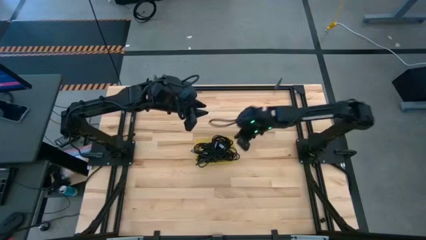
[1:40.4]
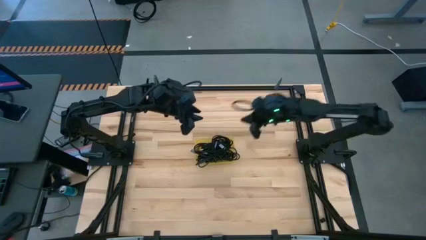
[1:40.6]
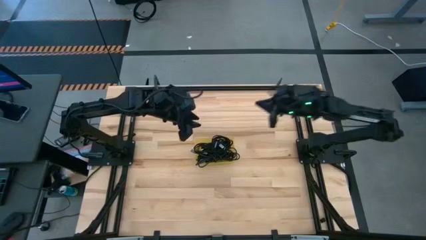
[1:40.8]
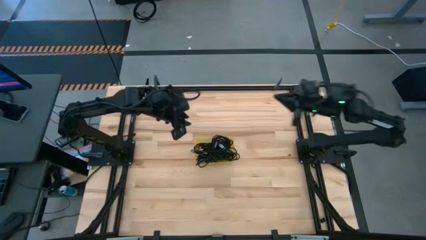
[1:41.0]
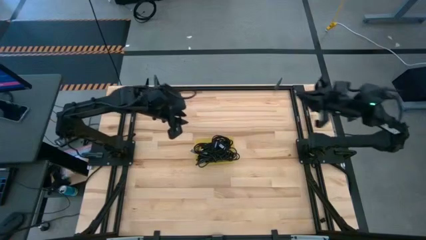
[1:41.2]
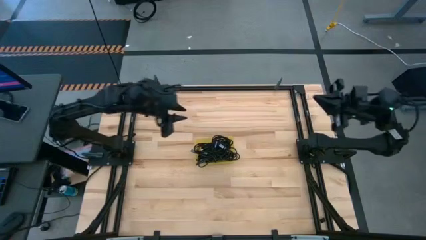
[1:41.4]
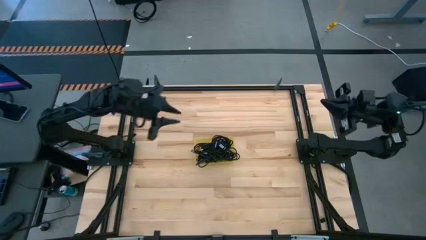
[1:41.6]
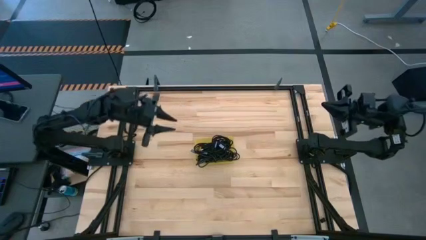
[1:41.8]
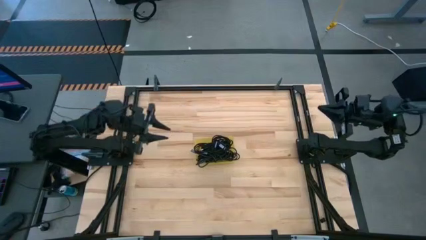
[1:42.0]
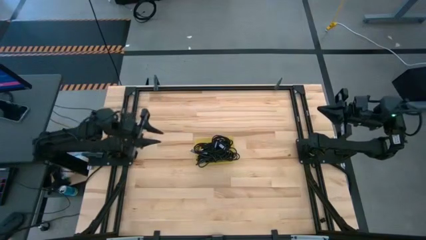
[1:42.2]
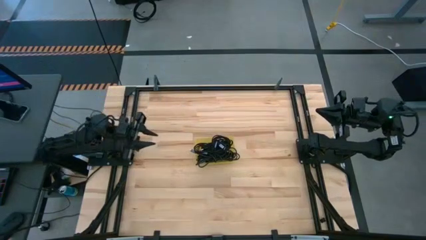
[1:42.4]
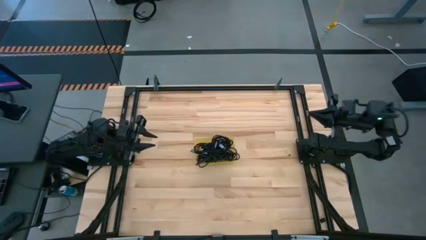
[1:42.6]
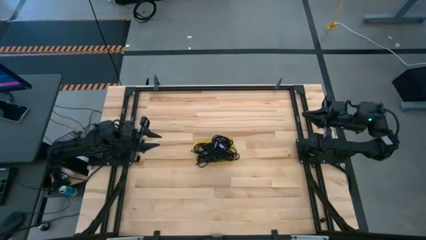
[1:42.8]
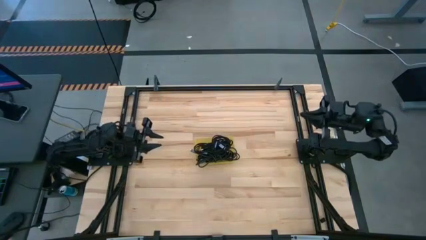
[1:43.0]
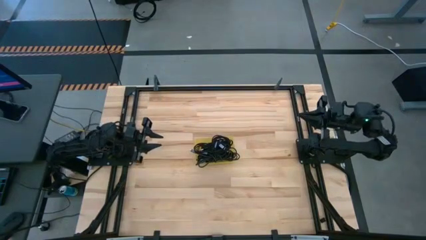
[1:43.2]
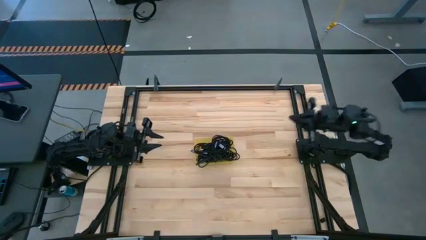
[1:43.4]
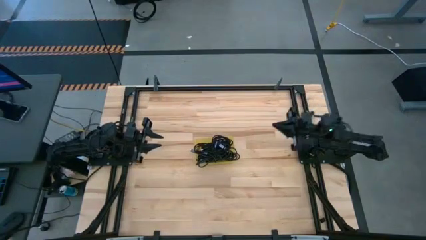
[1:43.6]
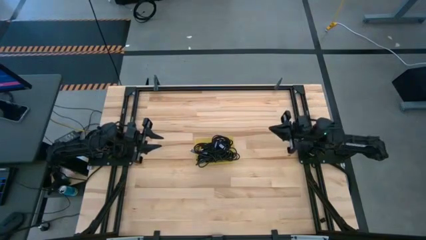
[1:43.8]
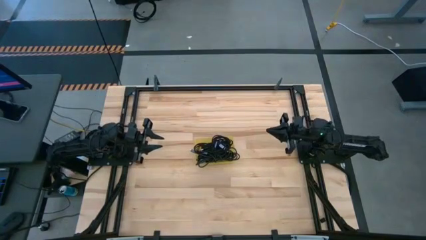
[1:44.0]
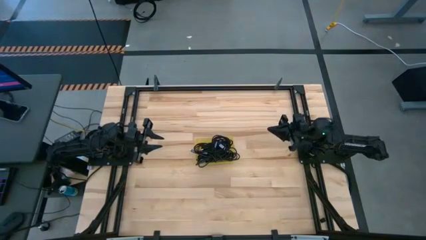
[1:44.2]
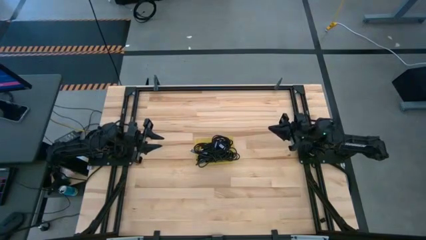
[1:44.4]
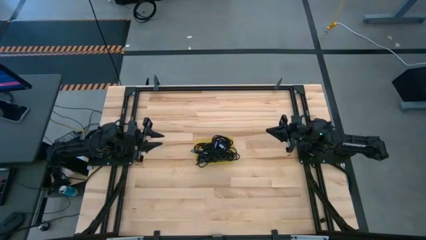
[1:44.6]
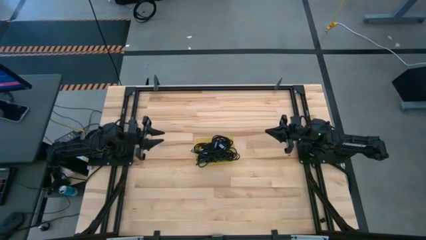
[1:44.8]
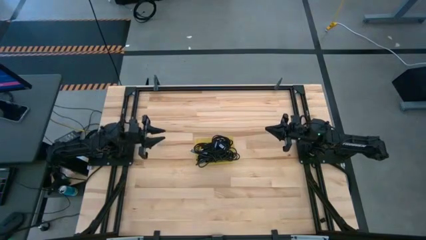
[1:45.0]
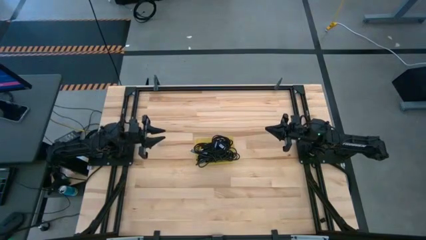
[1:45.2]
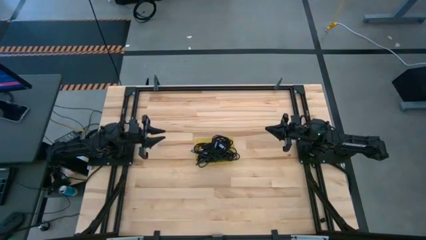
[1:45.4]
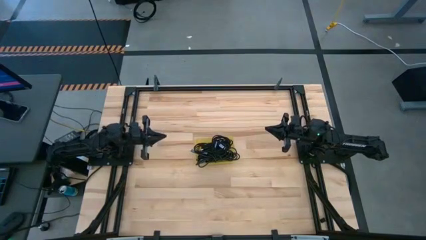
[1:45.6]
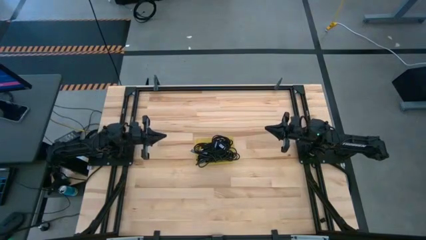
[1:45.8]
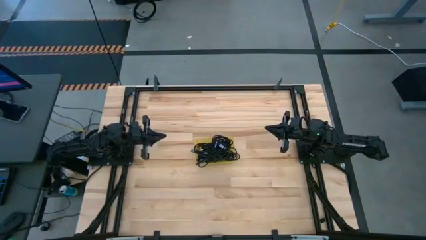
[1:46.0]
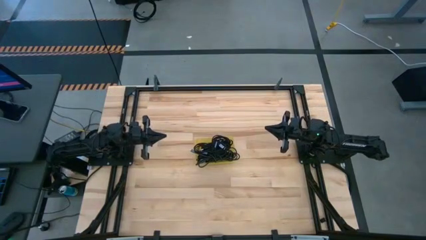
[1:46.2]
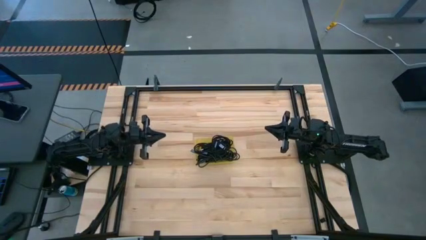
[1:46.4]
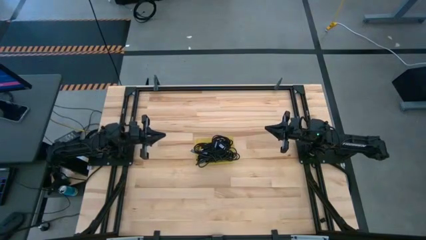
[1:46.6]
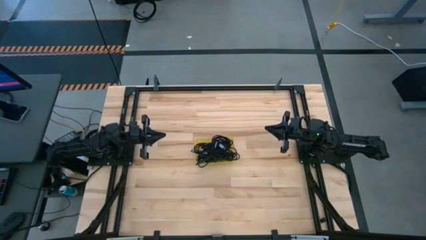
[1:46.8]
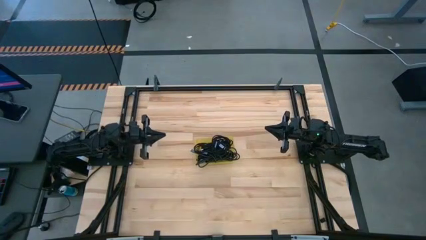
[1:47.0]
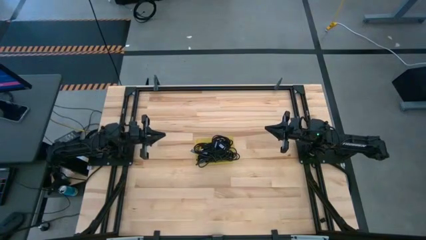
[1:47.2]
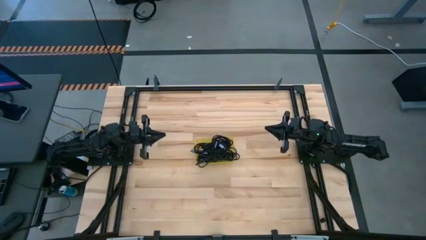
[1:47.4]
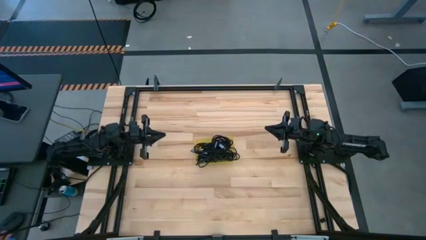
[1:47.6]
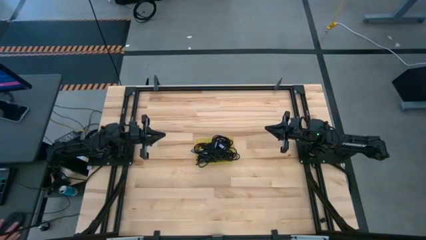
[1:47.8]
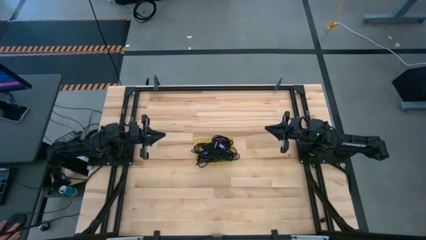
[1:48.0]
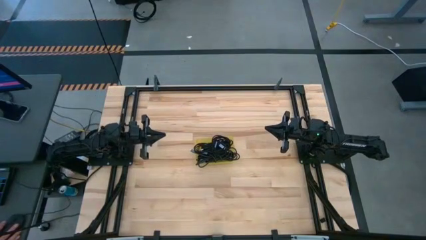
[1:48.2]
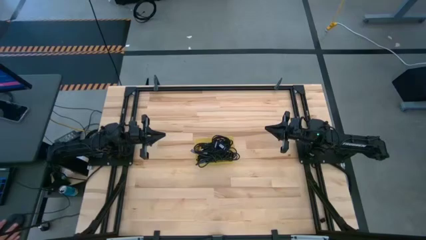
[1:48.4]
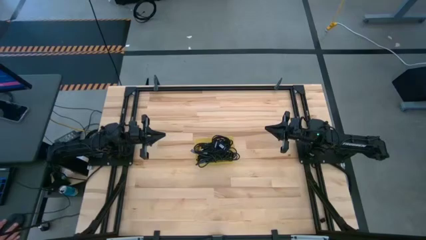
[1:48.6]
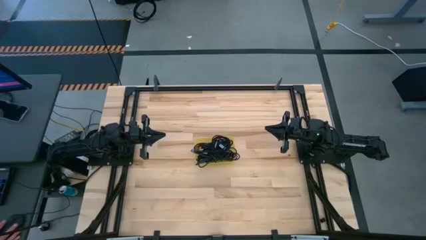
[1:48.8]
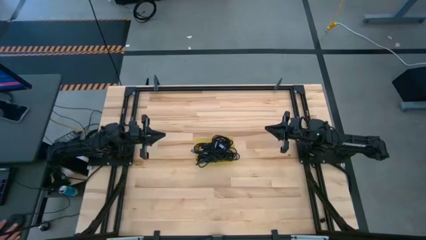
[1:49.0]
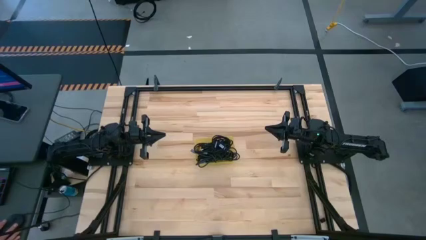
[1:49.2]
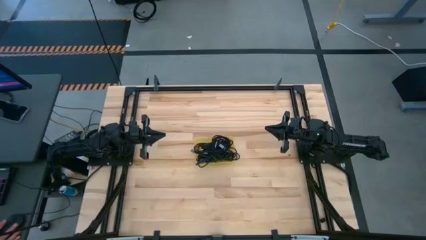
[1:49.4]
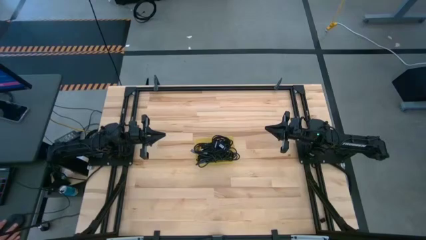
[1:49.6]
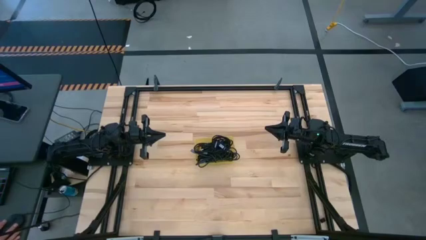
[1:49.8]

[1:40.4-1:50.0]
Task: Pick and place USB-C Cables
Return to Home Position

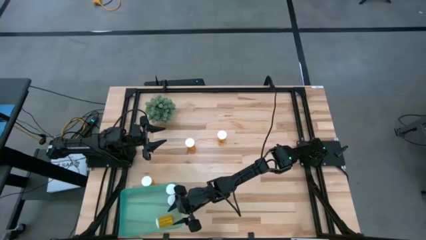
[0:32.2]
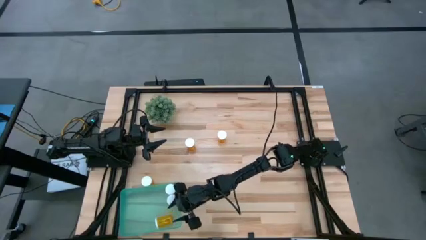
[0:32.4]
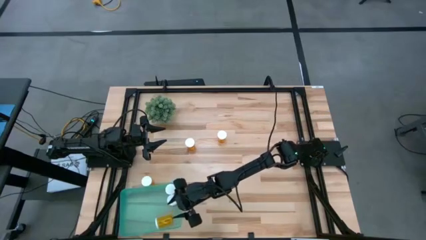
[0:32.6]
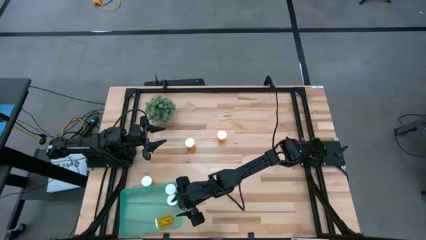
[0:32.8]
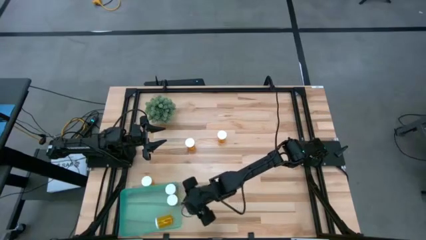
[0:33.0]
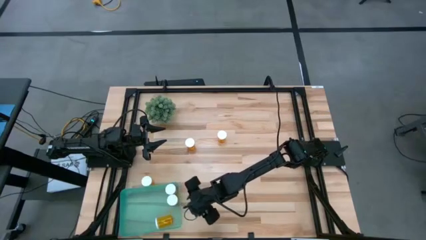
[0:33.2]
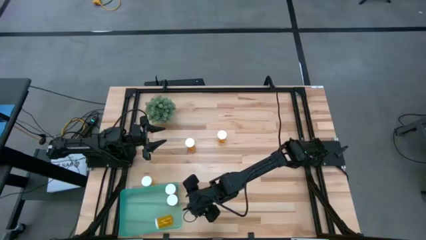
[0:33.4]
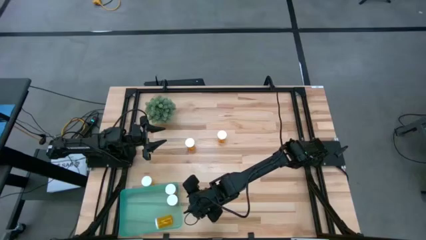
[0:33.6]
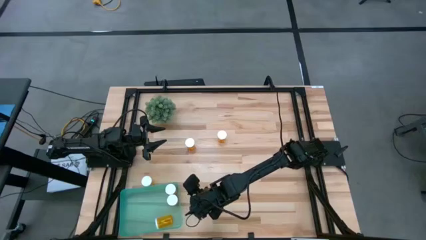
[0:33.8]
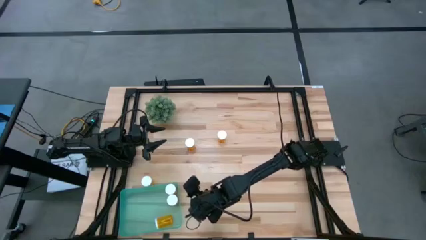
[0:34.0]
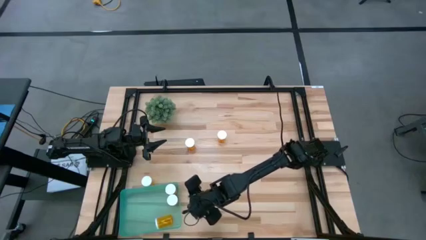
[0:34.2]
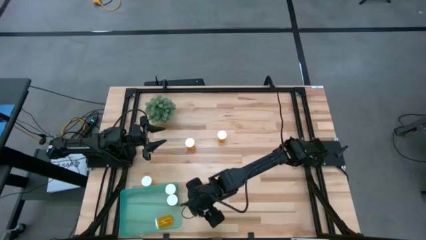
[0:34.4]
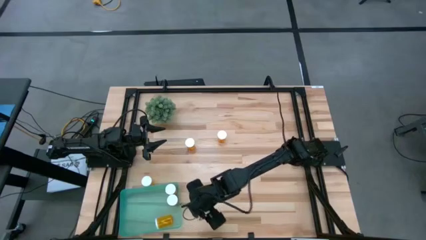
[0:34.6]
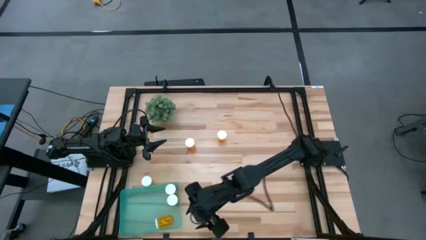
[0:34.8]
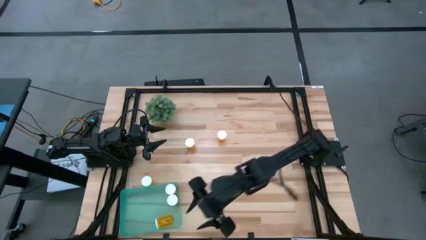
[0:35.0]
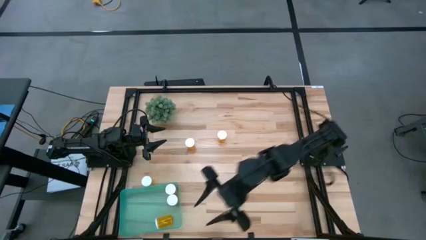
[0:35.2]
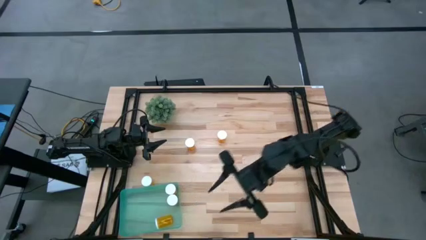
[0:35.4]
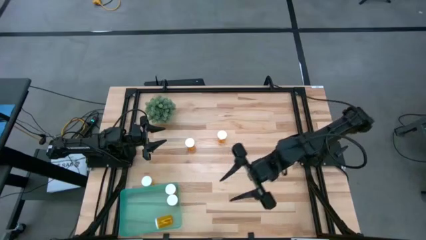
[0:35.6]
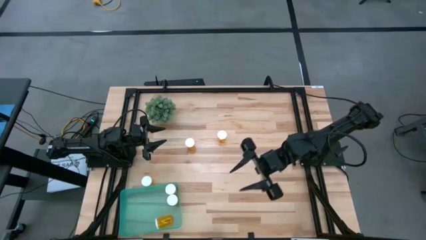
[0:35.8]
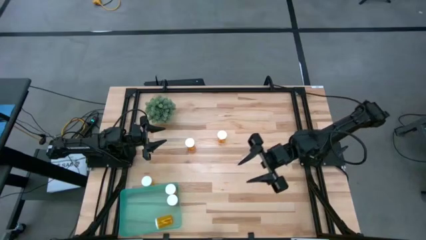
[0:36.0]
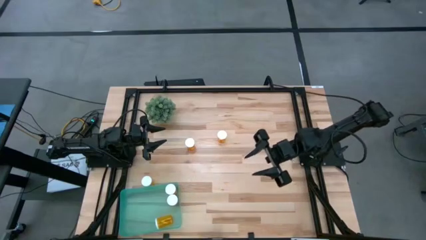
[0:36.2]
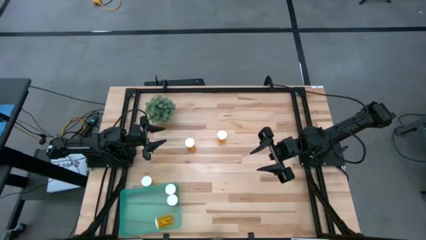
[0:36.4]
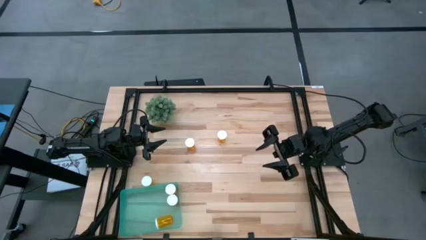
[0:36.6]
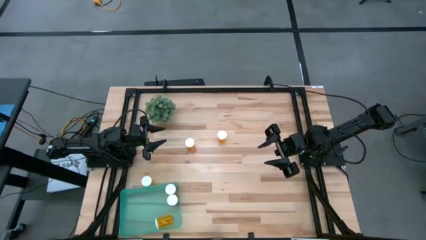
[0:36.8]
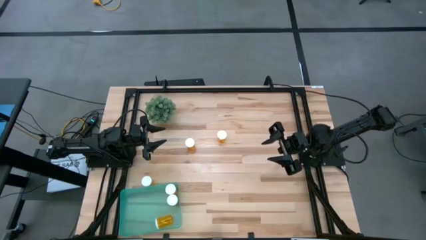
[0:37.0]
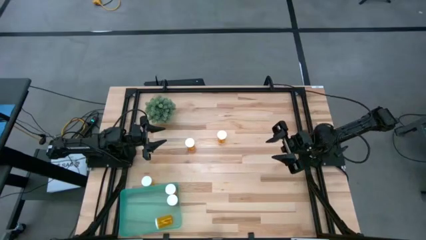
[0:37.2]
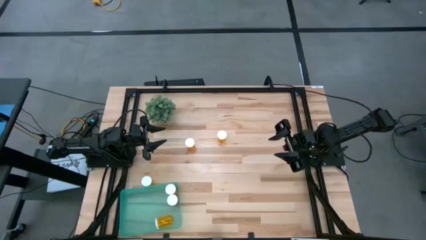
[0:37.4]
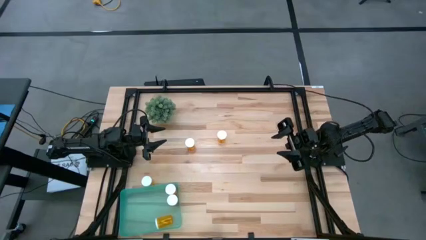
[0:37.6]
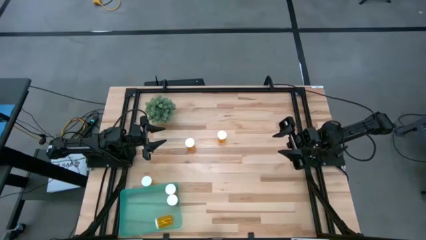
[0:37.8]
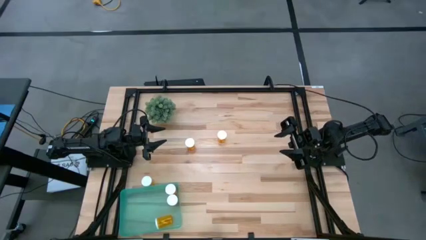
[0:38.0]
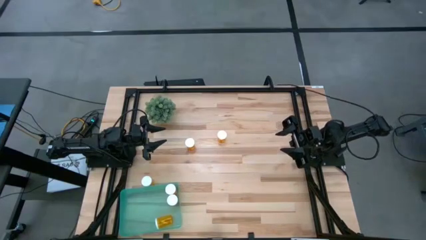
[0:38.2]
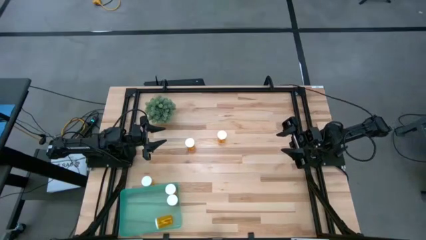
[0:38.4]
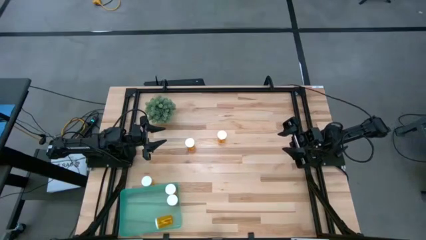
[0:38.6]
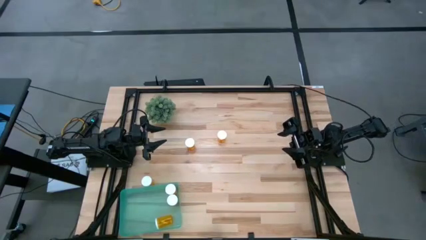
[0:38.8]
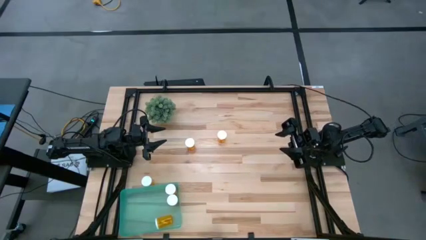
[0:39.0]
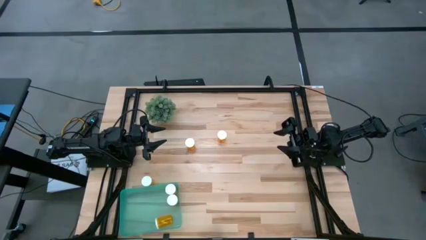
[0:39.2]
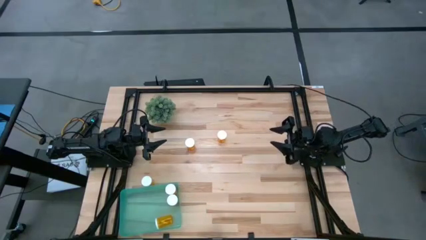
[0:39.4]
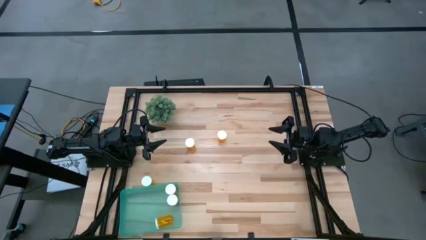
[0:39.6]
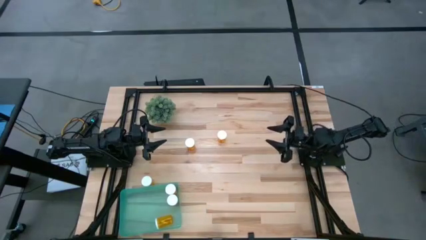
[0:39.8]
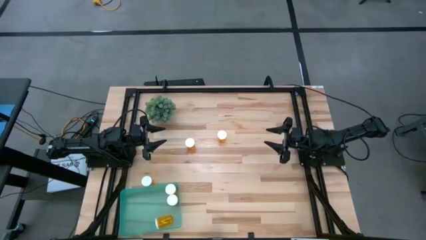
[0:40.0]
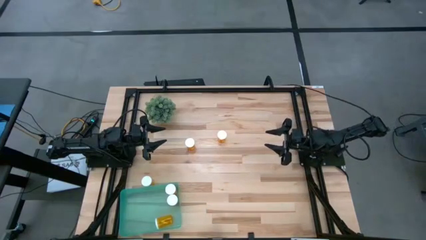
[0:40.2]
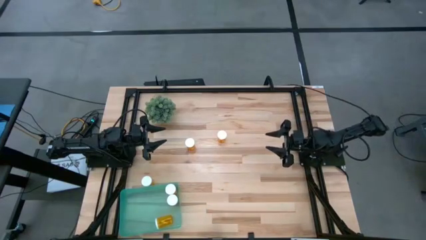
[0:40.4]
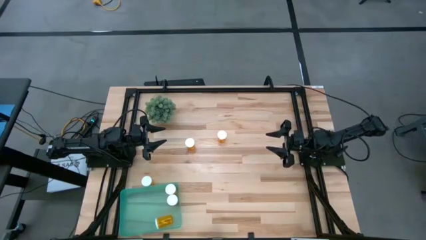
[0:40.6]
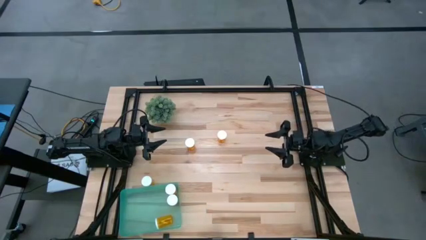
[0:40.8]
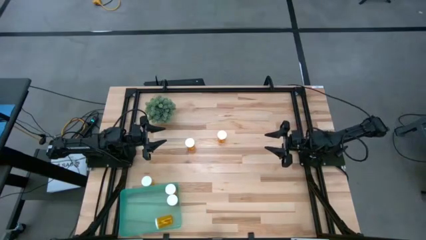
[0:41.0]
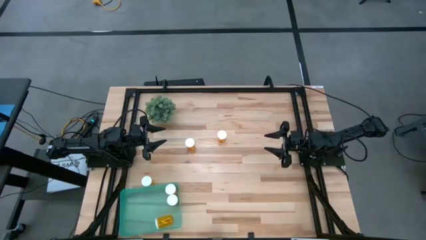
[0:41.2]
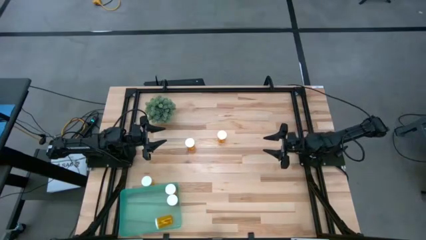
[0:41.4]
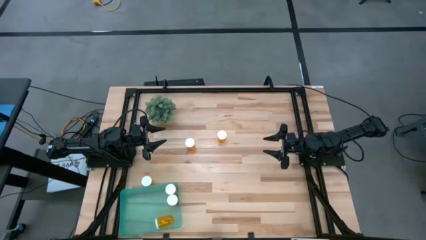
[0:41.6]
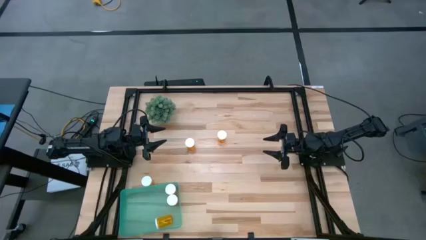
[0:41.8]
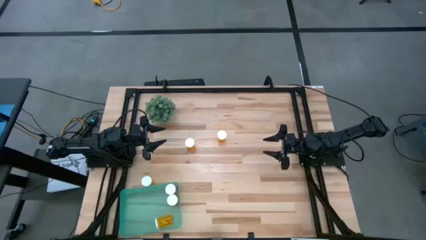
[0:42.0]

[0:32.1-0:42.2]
Task: Pick and place pill bottles into a basket
Put the middle yellow pill bottle into the green bin
